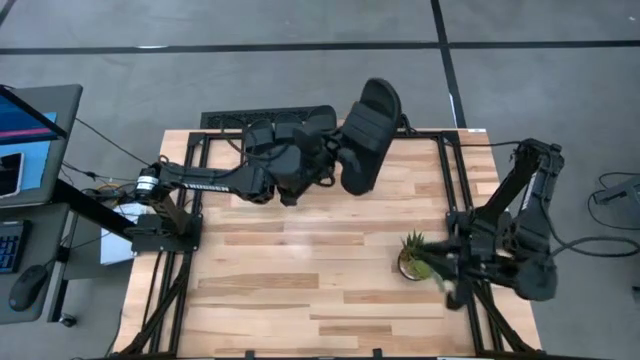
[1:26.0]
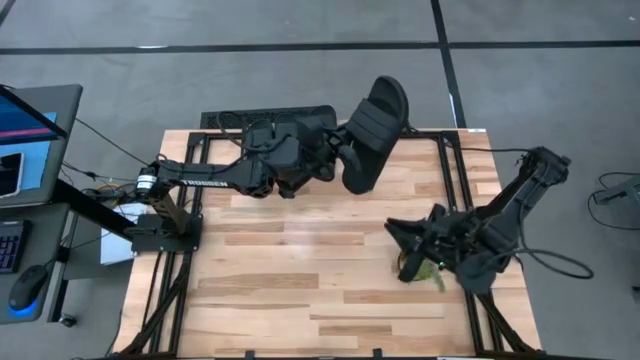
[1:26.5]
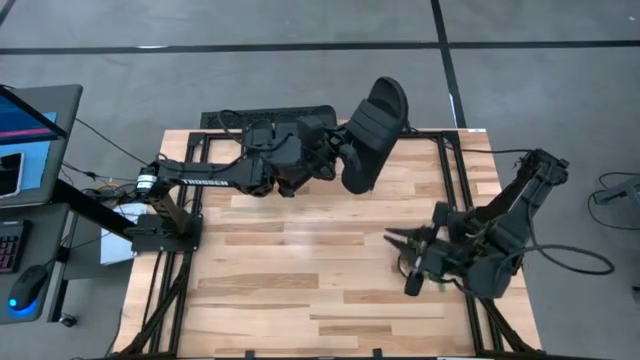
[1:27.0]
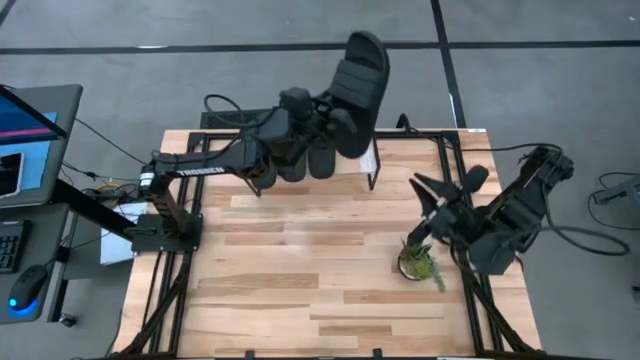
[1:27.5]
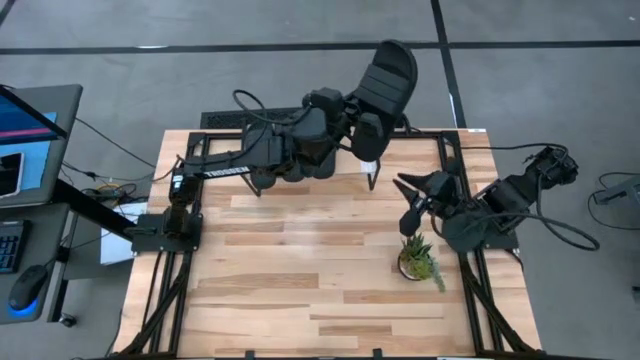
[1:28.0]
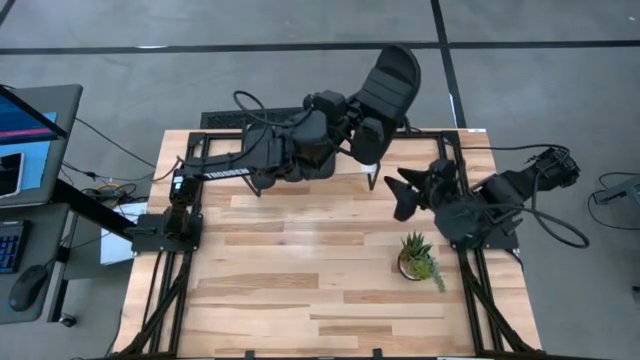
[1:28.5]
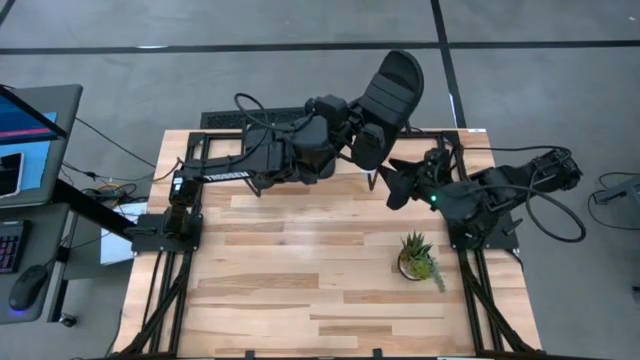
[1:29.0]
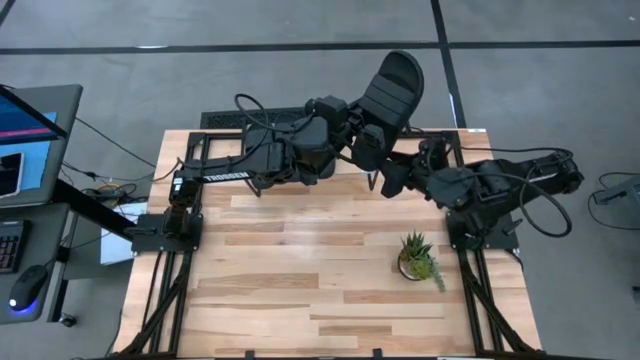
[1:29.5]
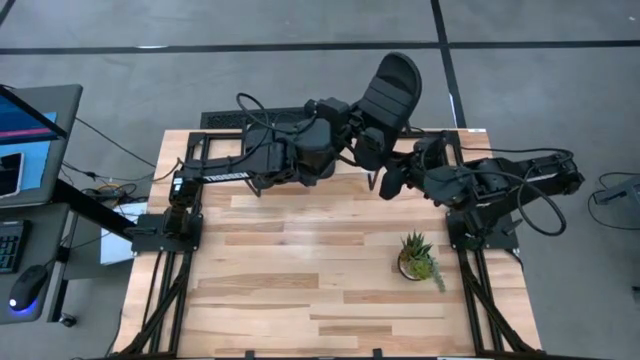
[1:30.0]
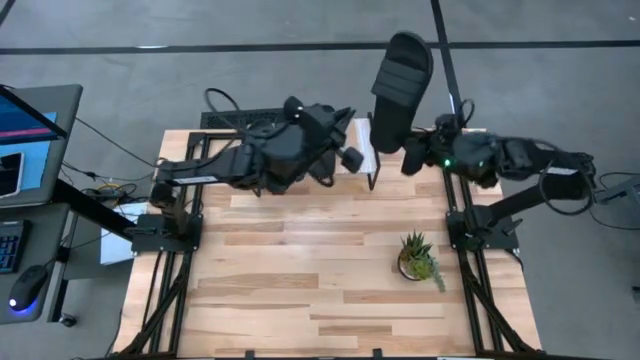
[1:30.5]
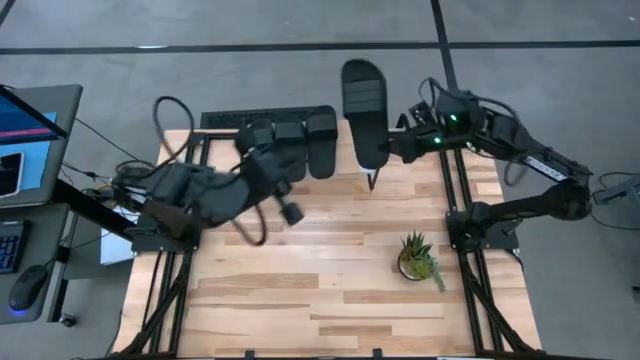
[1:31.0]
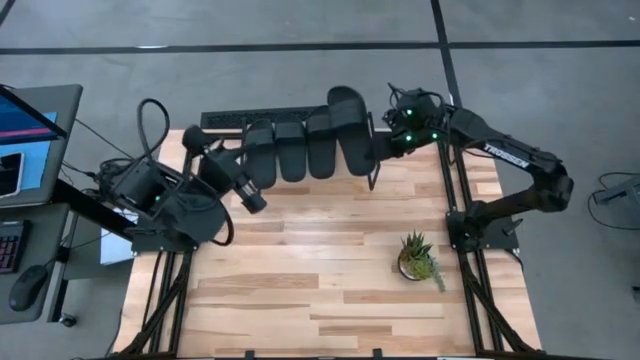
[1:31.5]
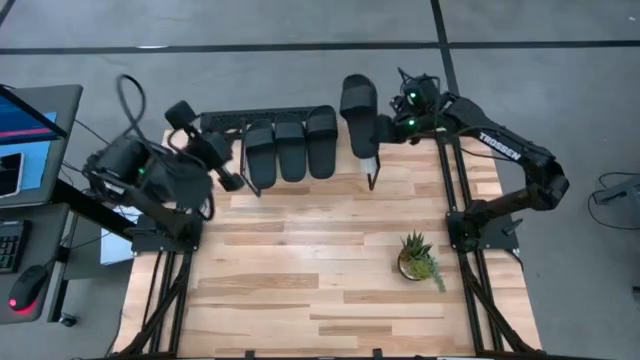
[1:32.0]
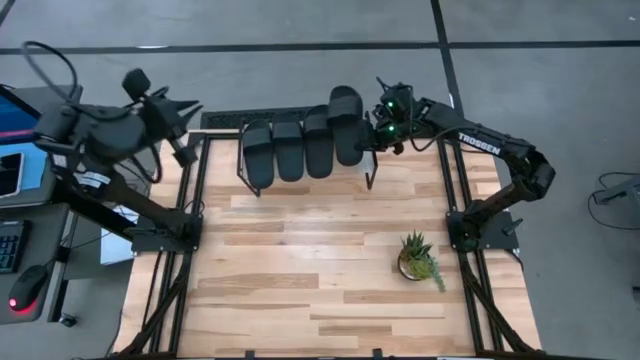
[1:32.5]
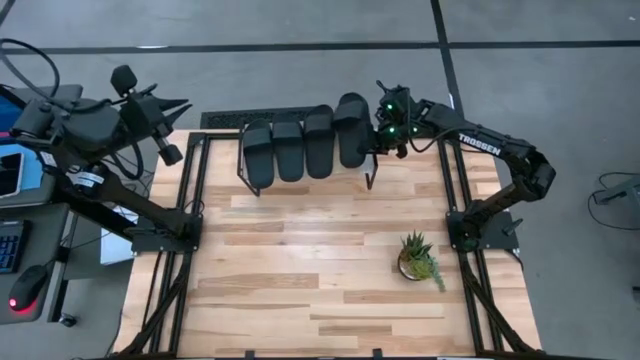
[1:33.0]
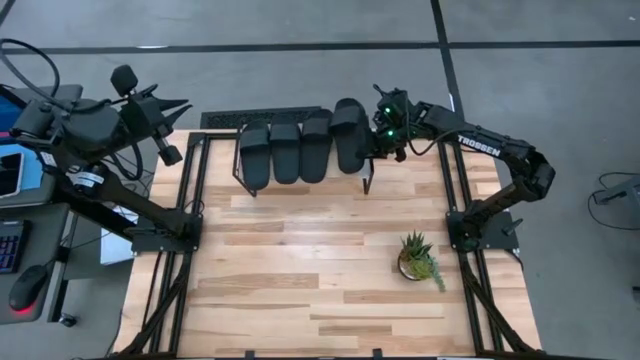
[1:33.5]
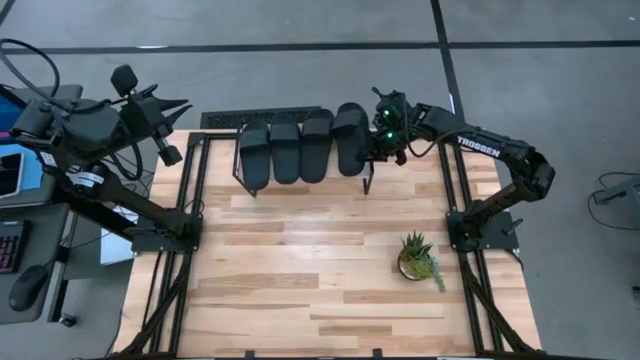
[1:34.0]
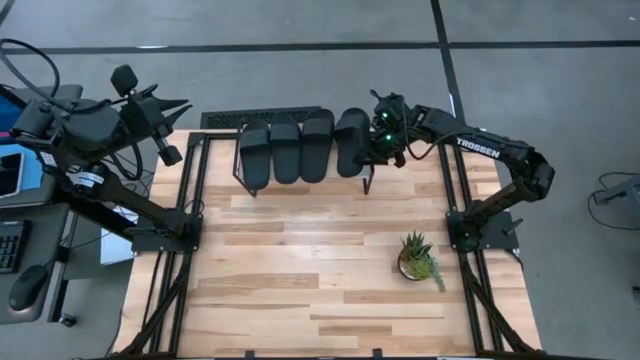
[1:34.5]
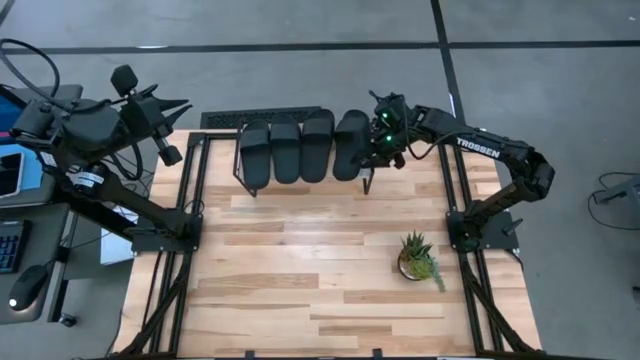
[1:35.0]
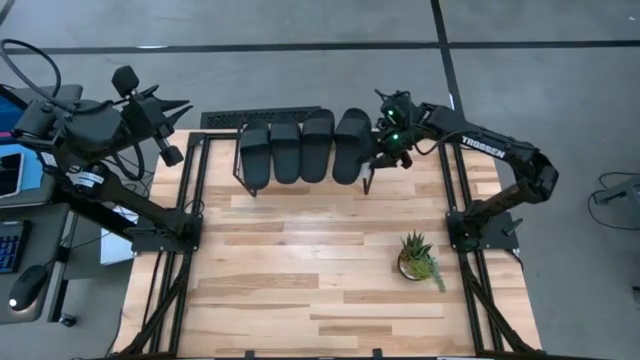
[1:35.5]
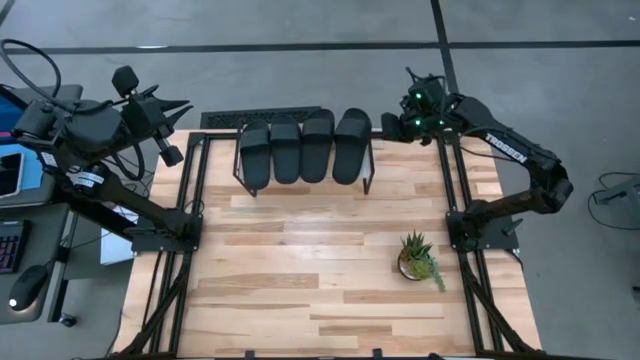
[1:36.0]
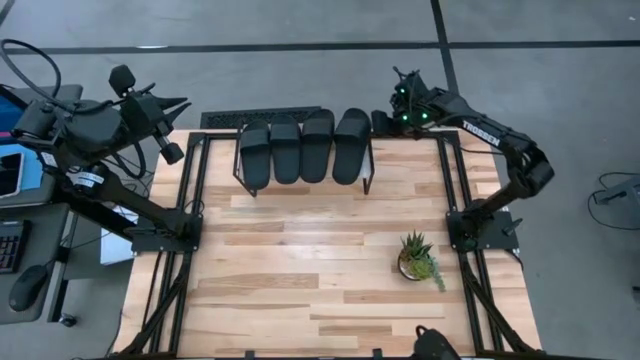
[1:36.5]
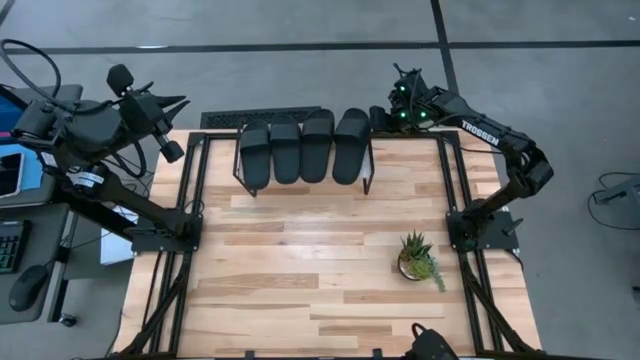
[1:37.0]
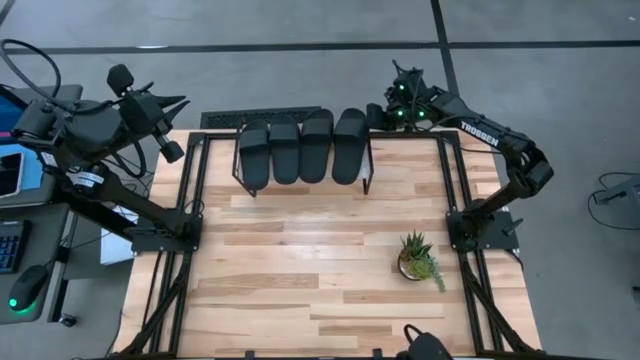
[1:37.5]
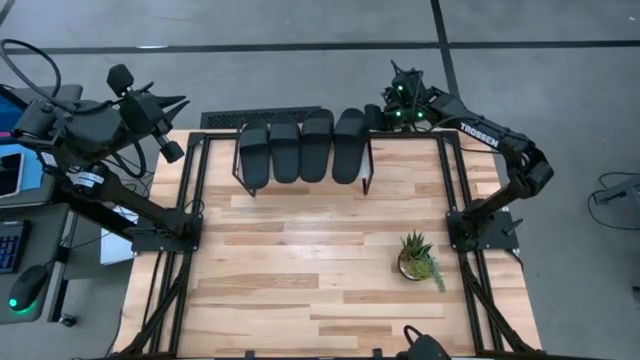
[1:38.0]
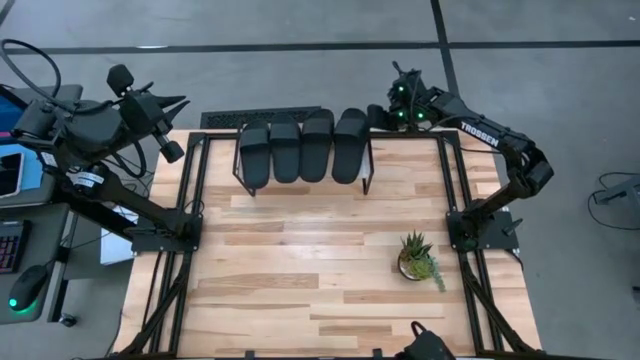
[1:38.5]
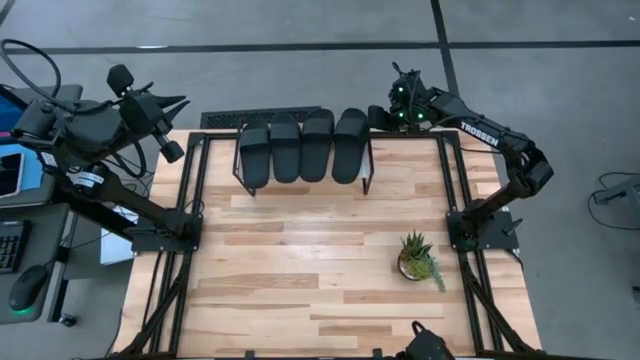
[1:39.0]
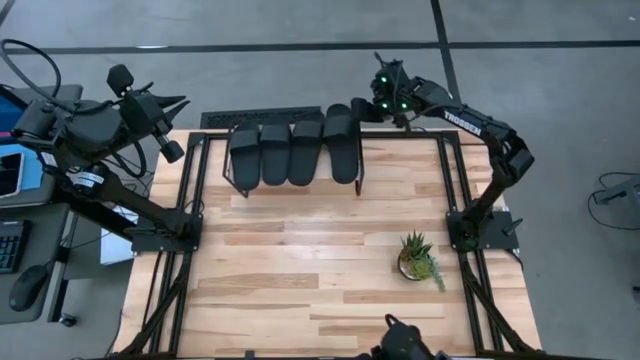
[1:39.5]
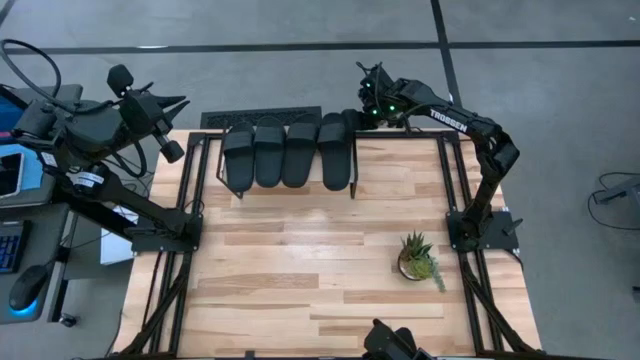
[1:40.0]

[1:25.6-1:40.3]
Task: Pick and place slides into the shelf
Put the black slipper on the shelf

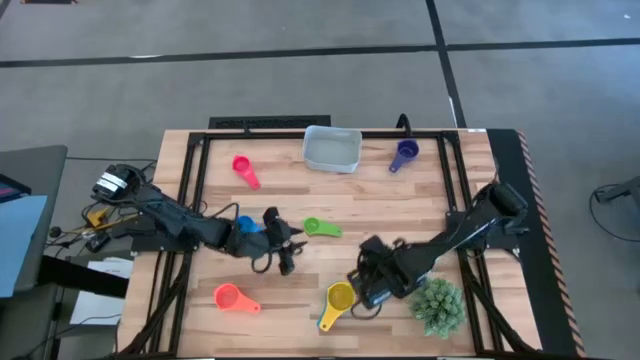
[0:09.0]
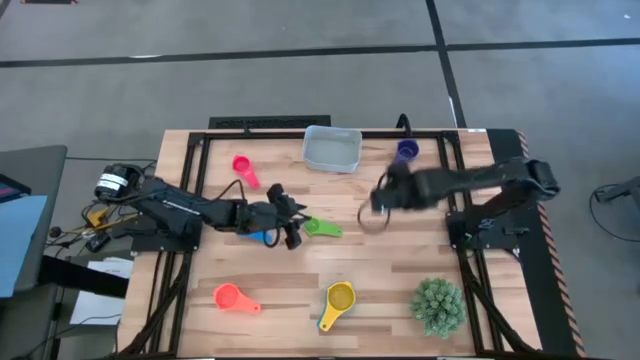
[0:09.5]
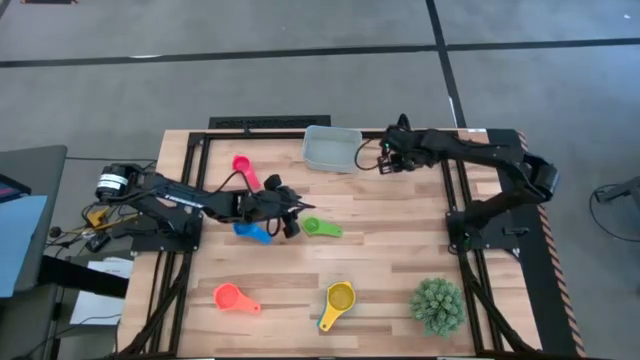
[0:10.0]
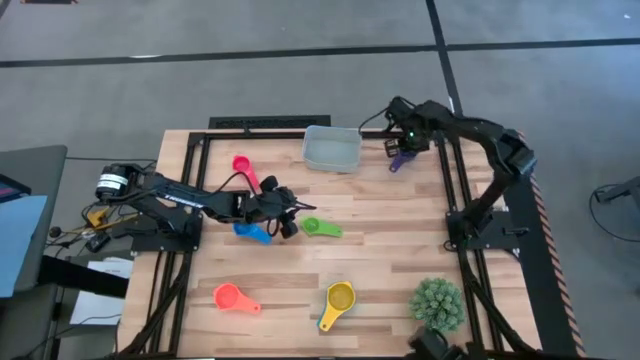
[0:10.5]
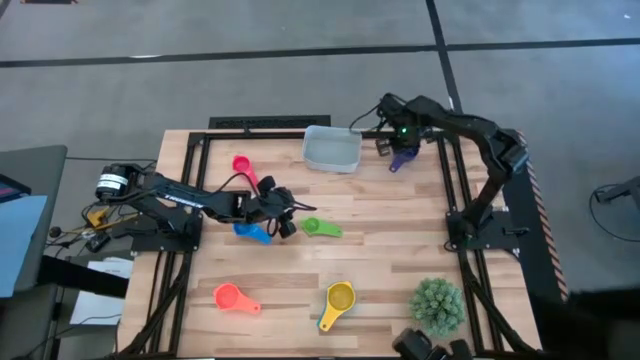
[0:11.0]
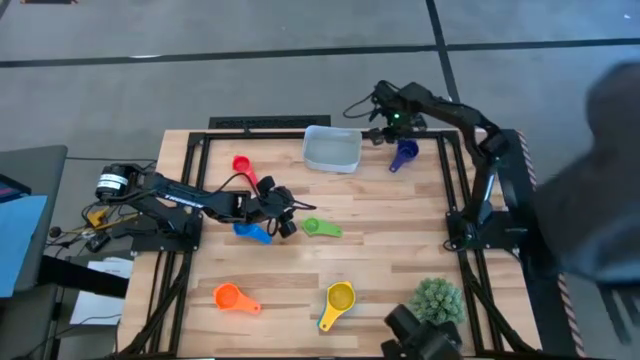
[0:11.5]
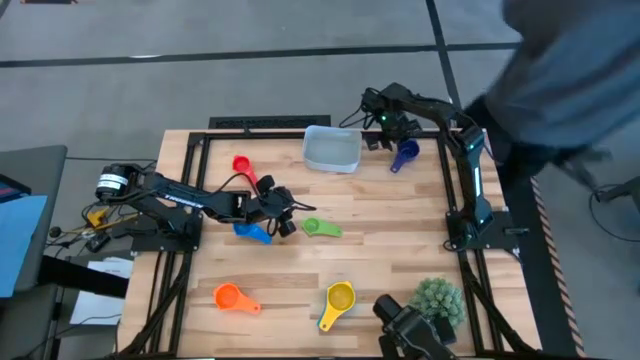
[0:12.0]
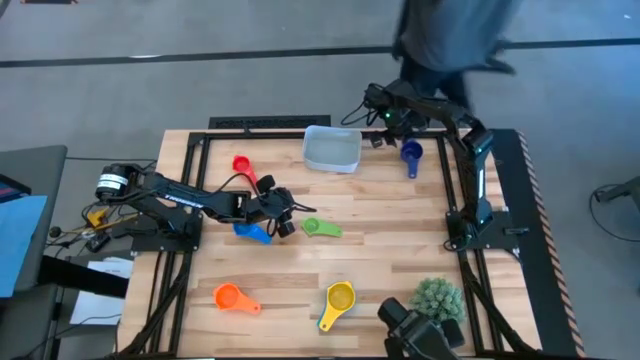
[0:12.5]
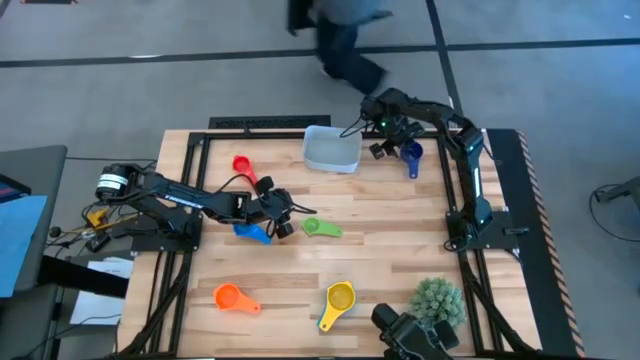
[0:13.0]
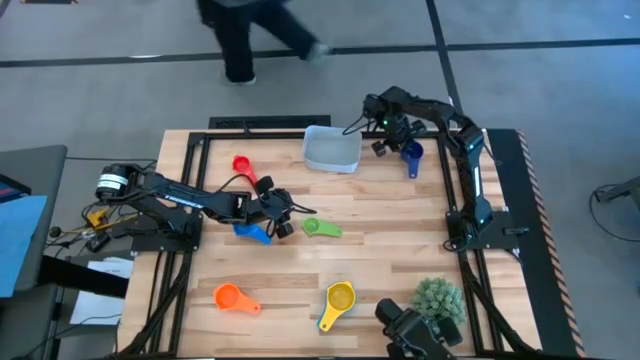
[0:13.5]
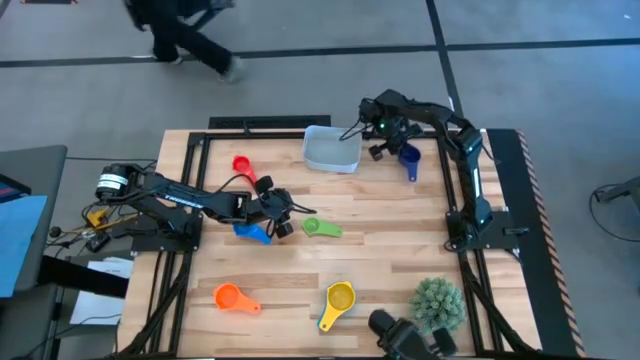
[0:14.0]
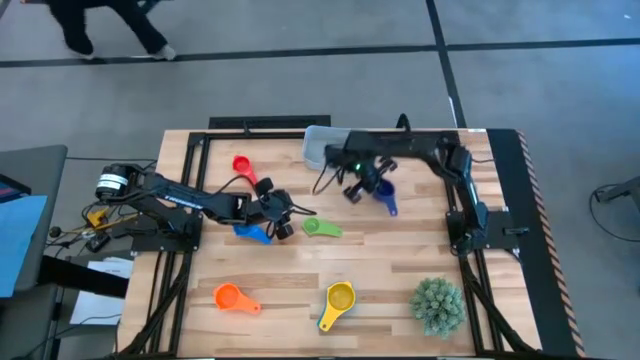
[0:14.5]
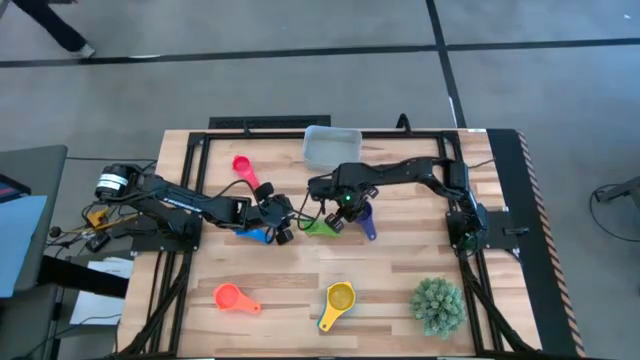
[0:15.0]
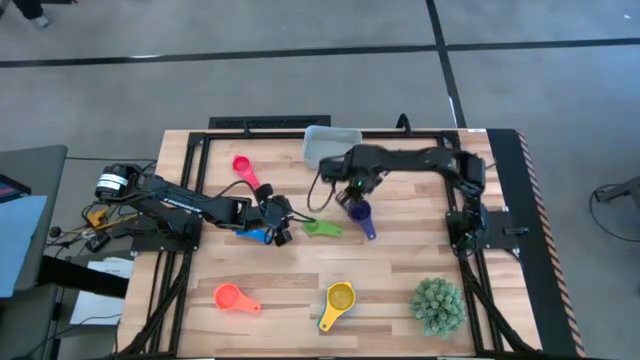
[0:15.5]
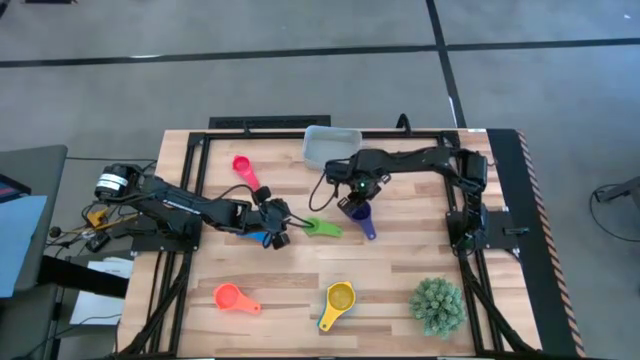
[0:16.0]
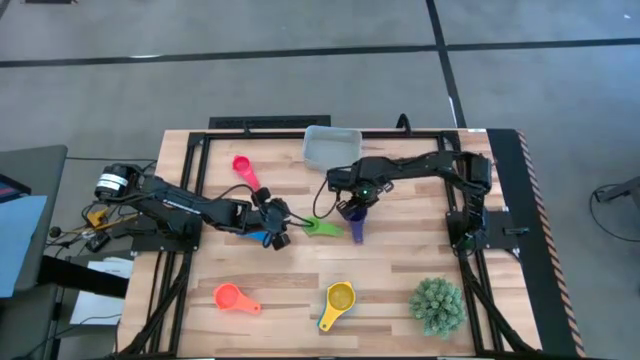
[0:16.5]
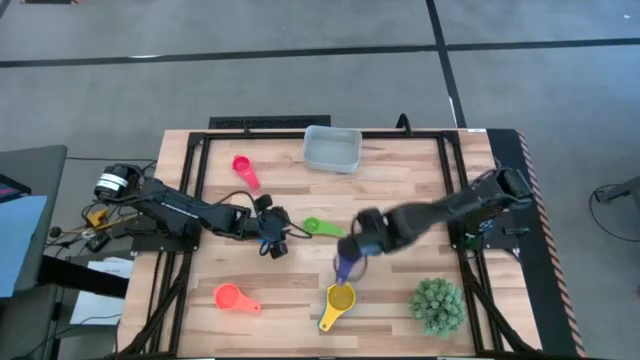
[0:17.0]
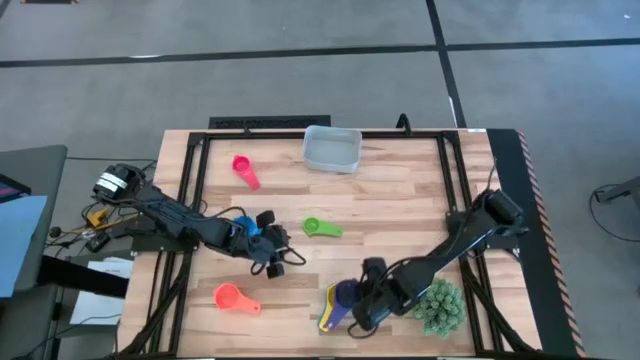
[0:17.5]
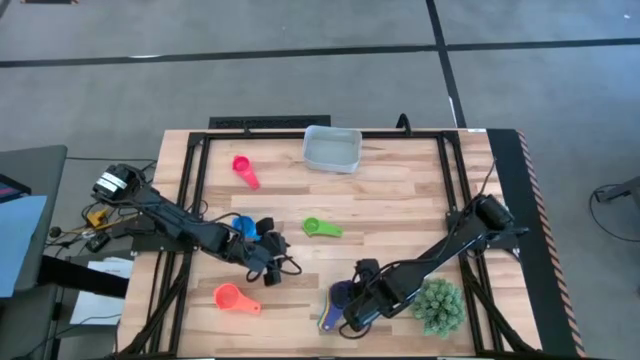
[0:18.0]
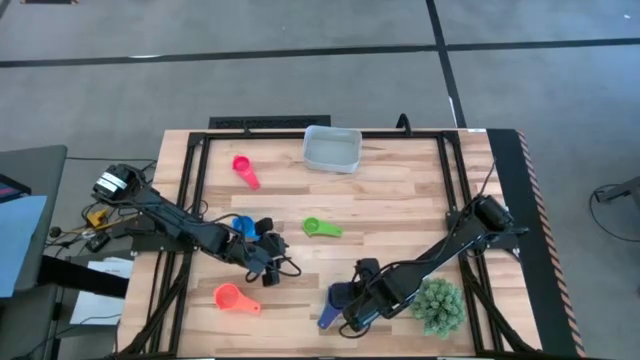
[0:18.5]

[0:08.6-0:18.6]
Task: Nest measuring cups in basket
Stack the purple measuring cup on top of the yellow measuring cup
